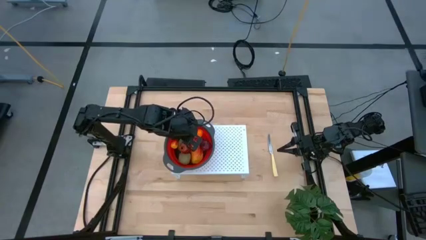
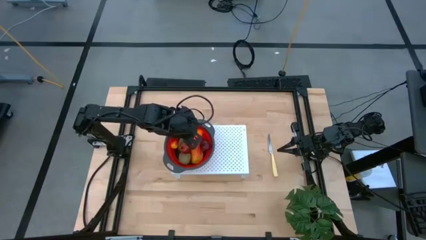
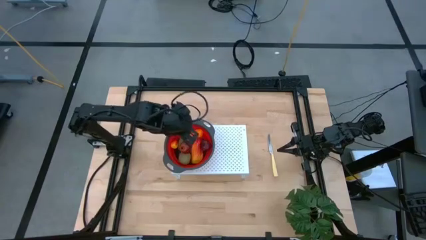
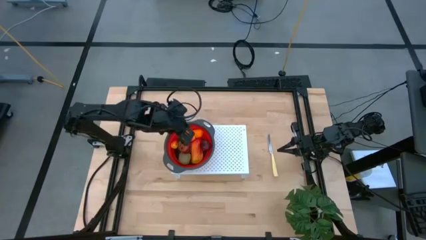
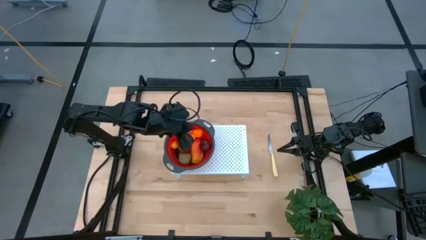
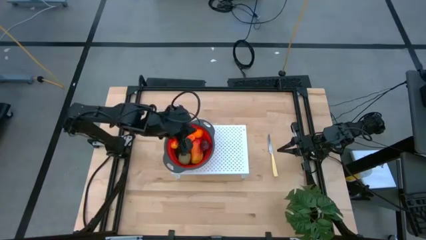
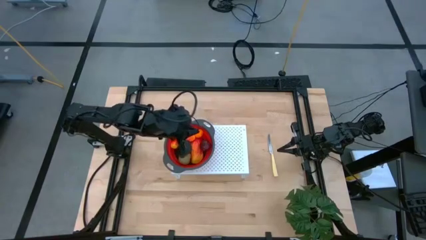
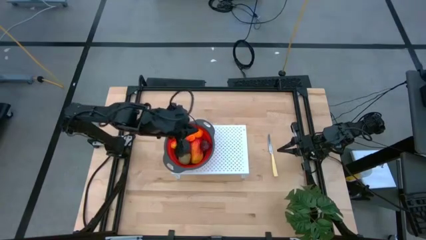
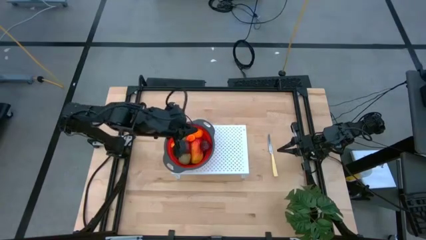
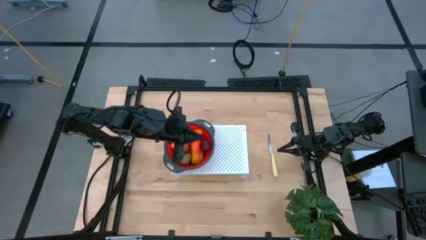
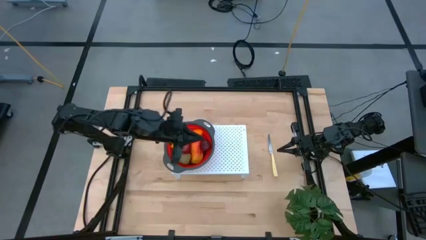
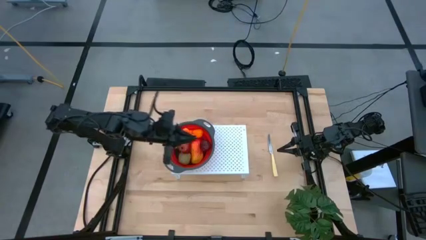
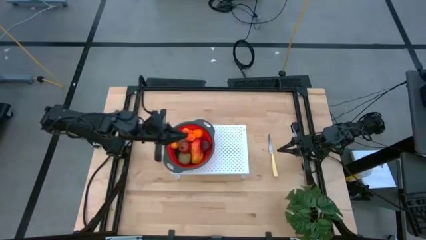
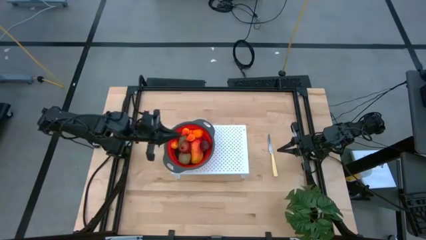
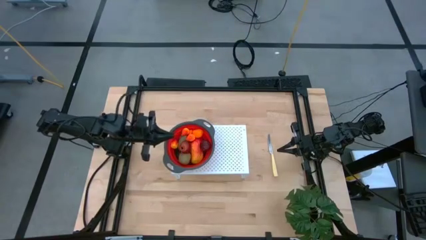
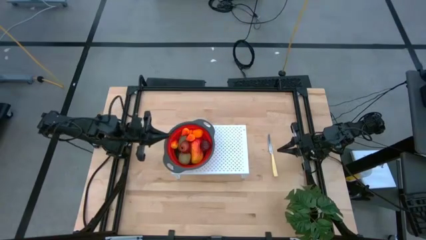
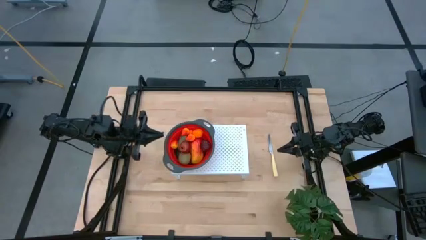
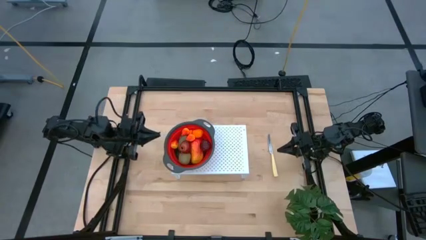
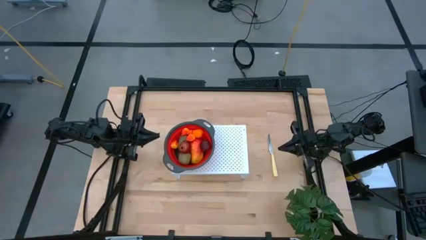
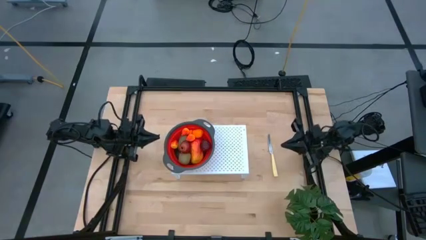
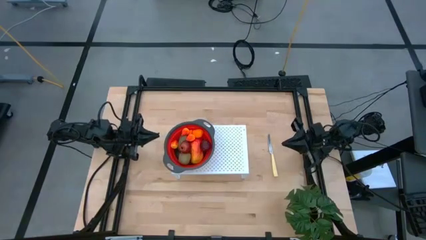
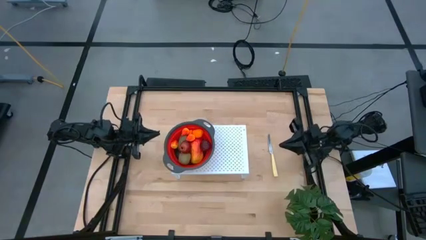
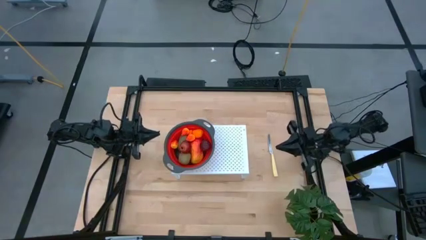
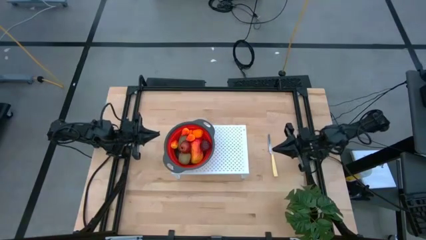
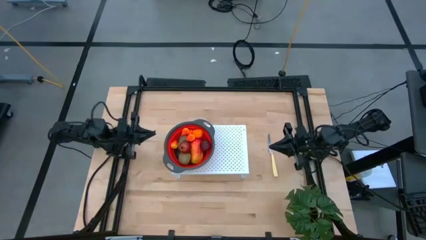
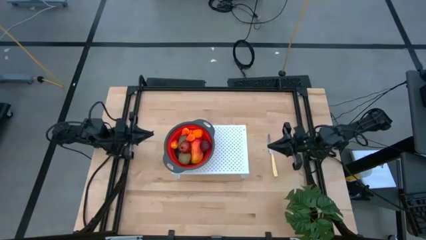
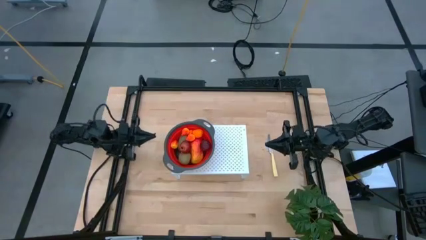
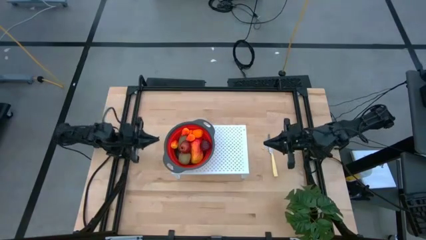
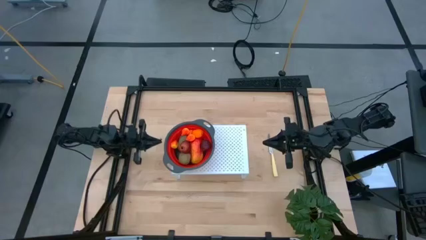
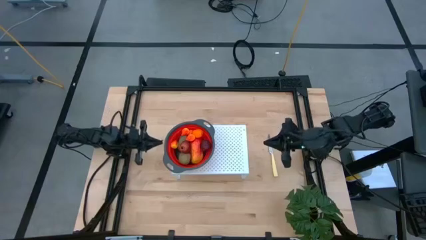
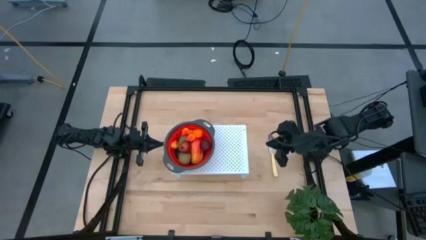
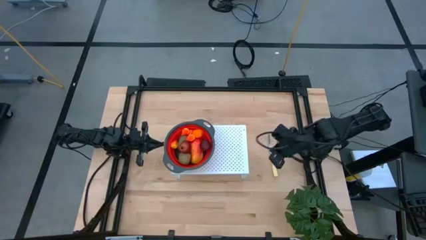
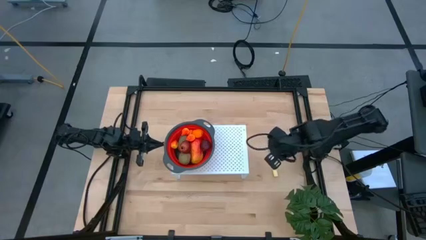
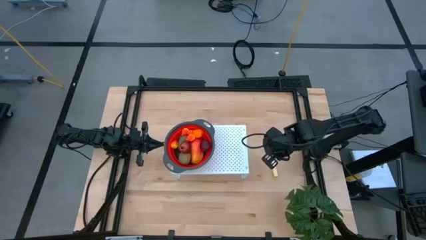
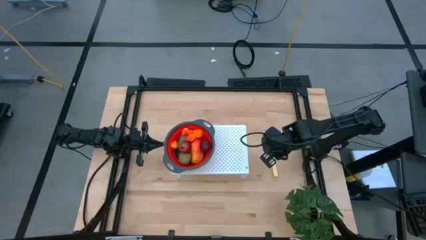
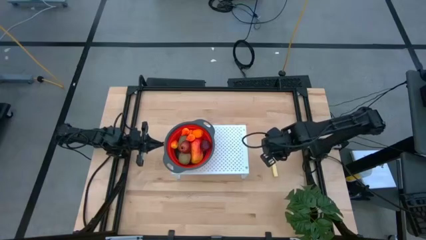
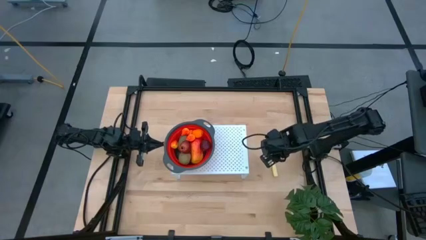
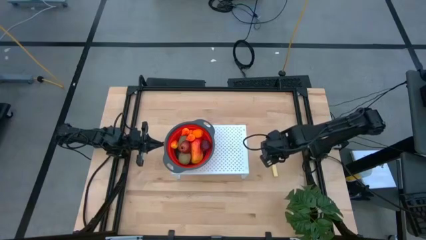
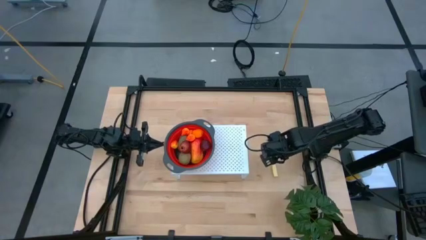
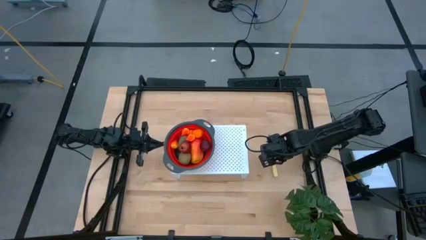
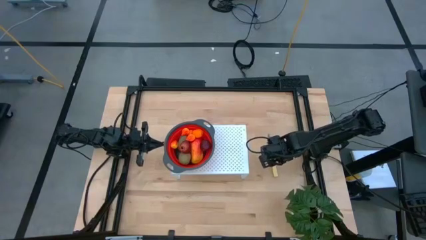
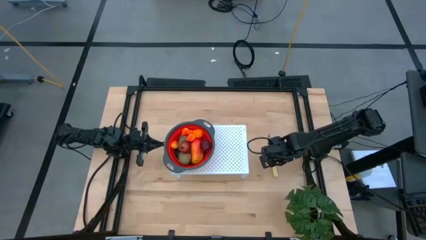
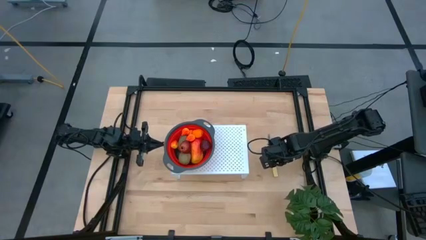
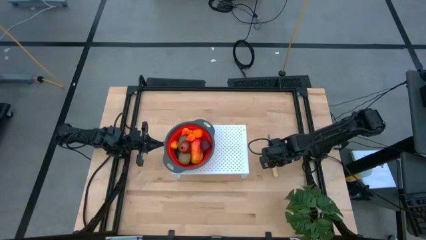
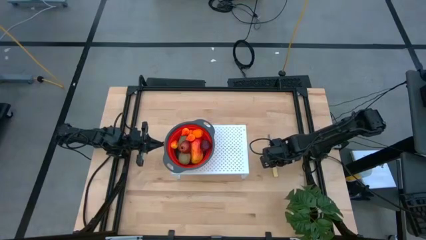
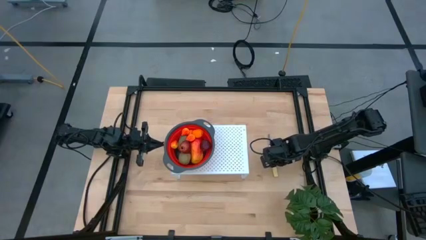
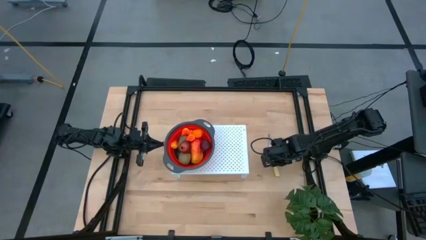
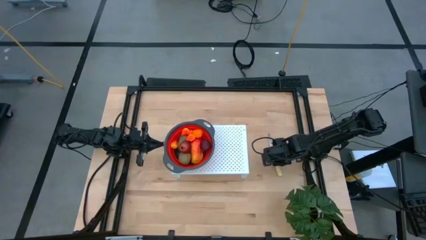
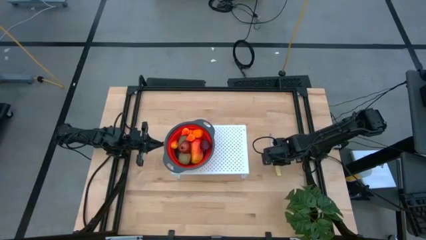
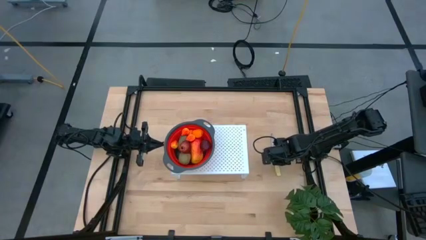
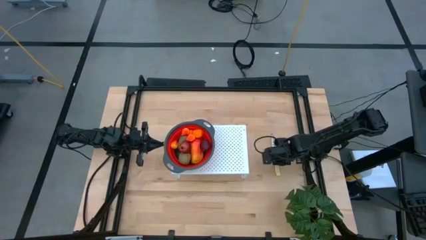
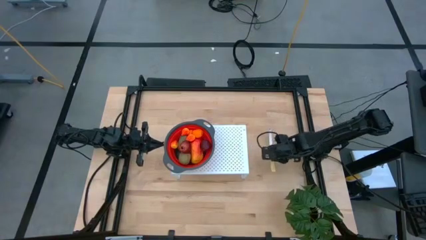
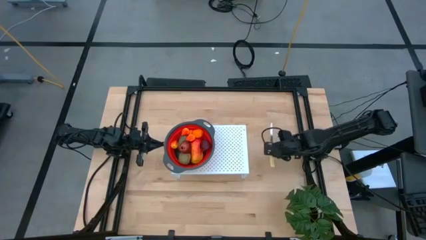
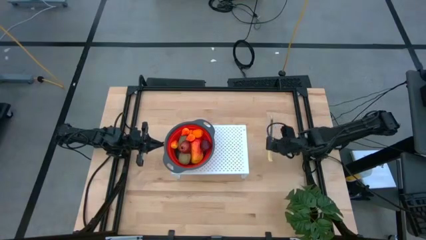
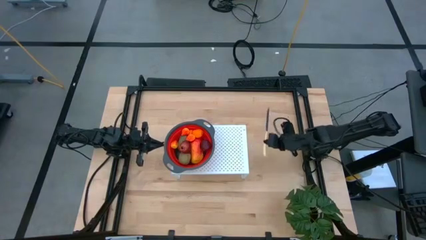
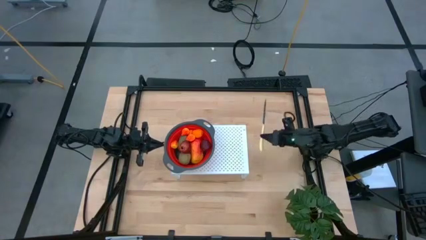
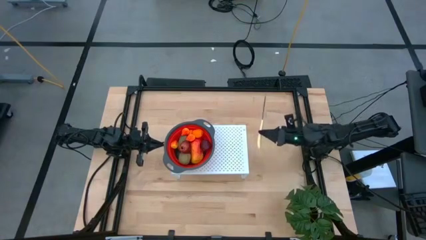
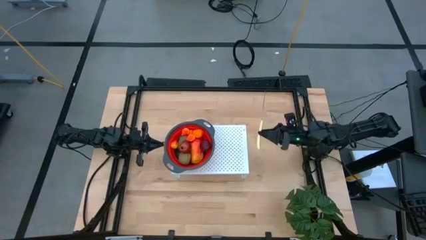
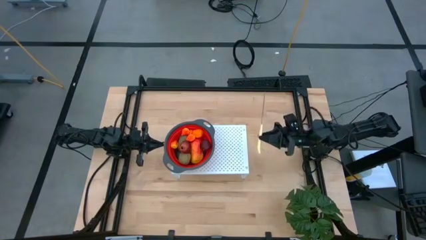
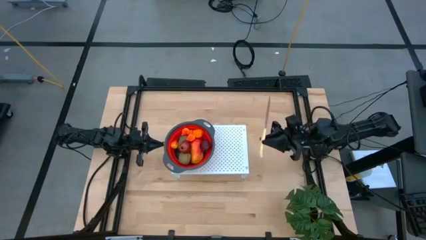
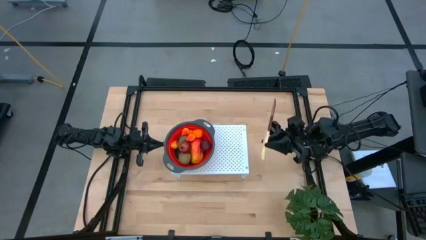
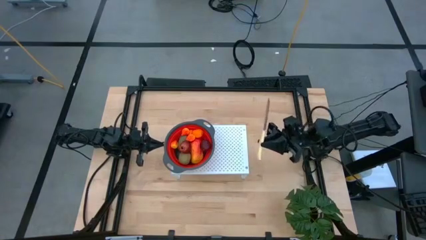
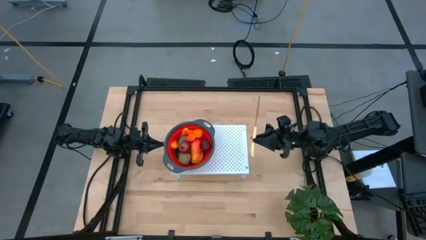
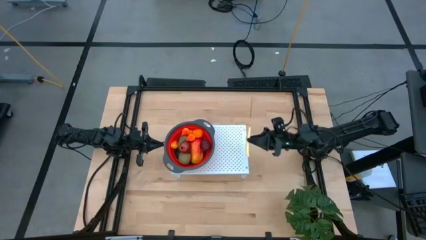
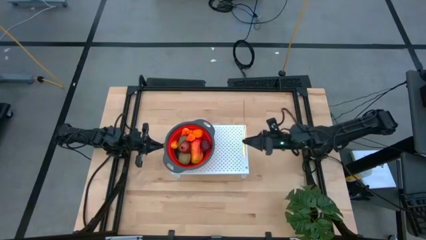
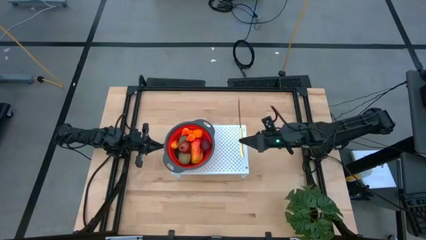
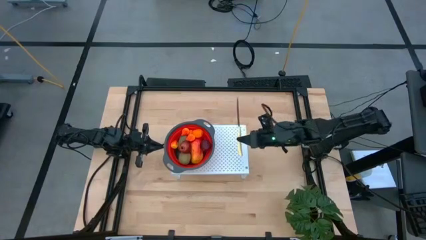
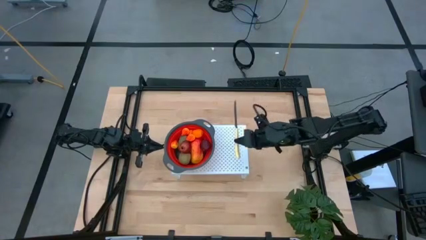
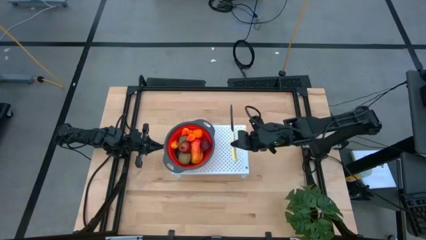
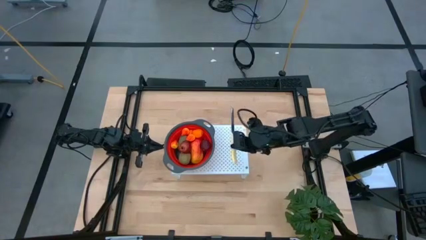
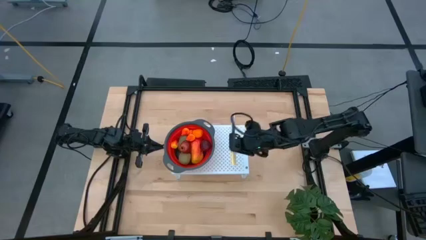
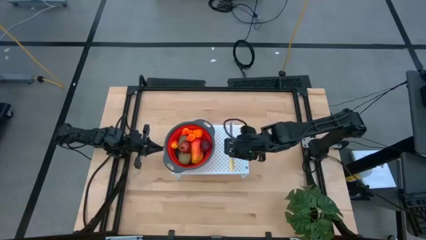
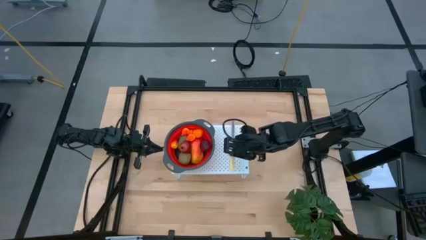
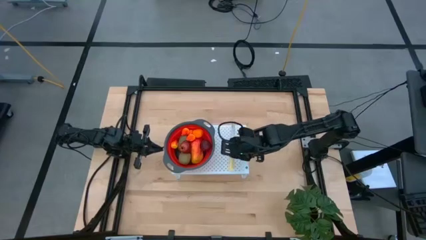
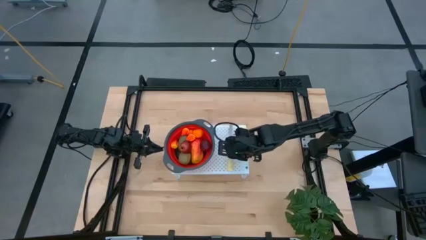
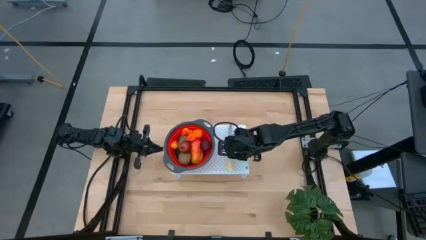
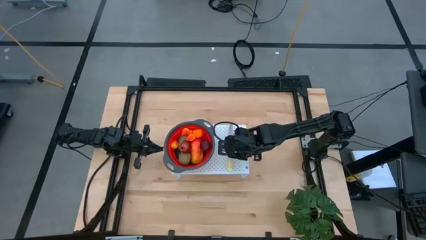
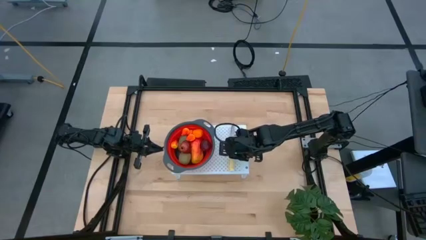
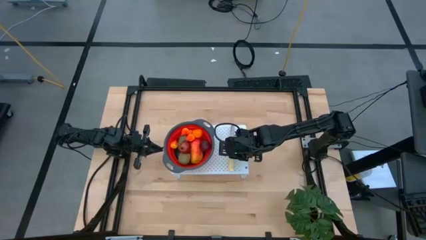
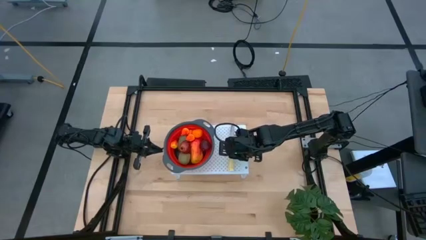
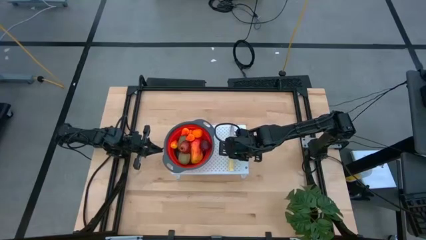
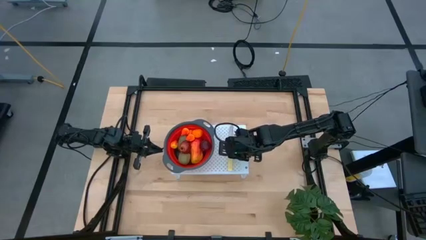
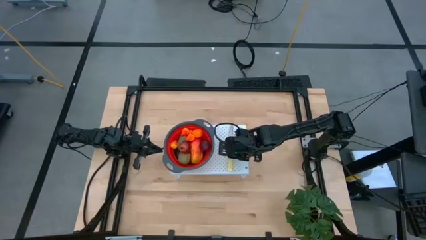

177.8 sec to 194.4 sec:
Task: Pick & Place Fruit
Put the yellow table knife on the shelf to the right of the red strainer bowl
